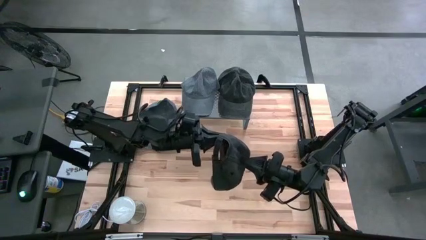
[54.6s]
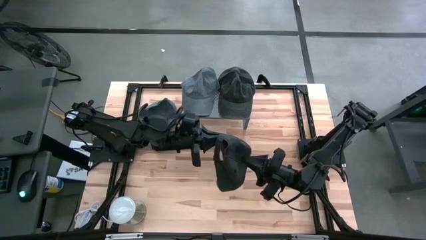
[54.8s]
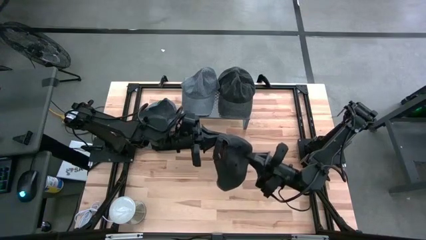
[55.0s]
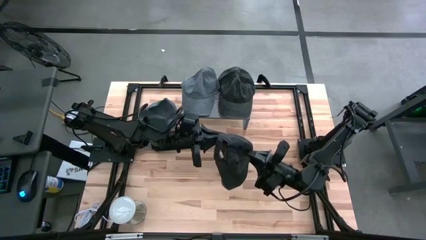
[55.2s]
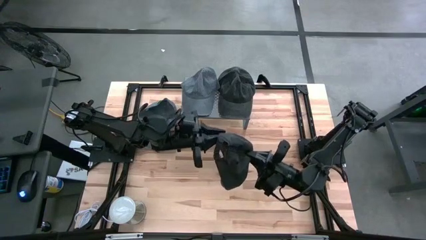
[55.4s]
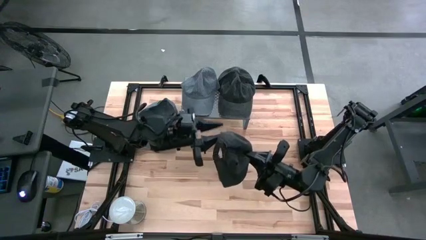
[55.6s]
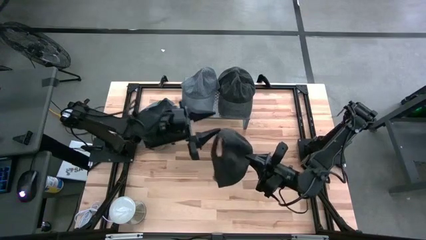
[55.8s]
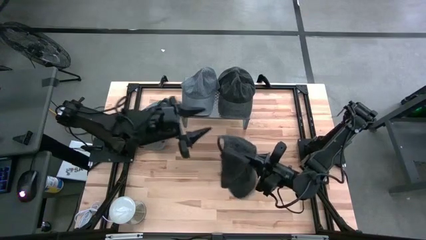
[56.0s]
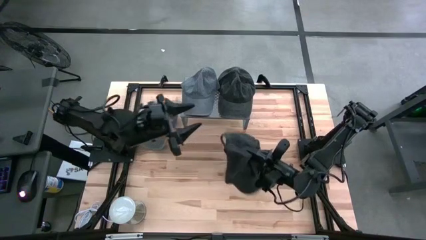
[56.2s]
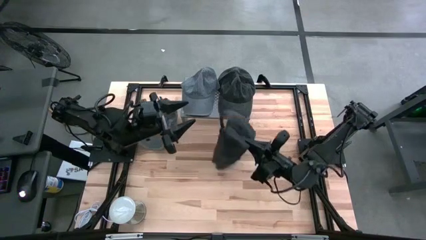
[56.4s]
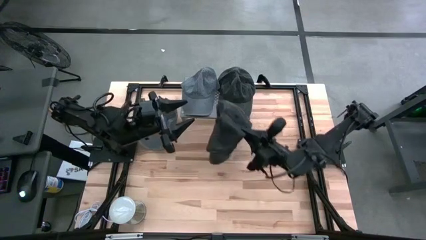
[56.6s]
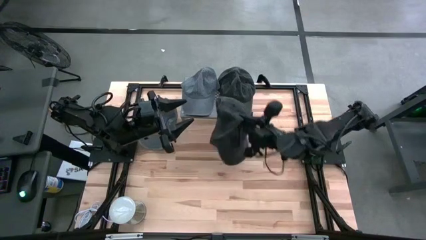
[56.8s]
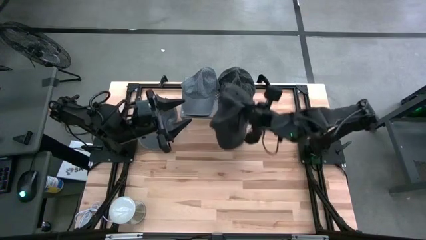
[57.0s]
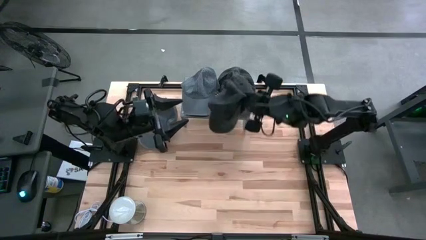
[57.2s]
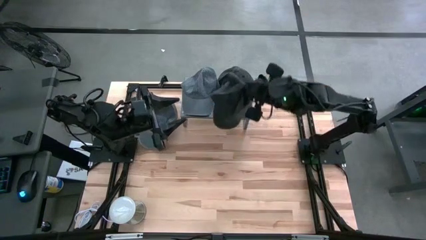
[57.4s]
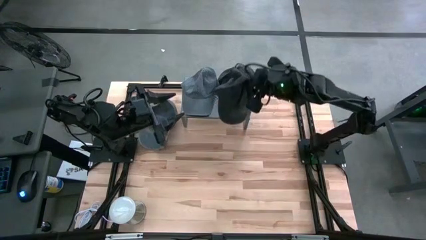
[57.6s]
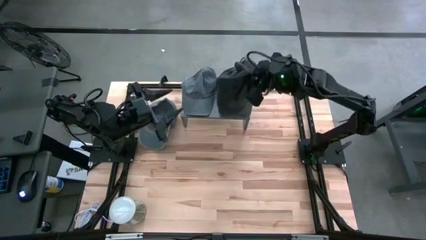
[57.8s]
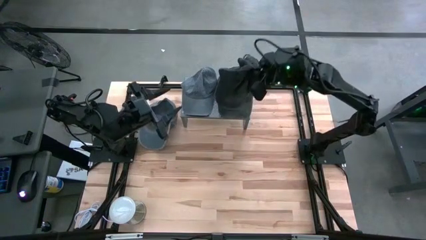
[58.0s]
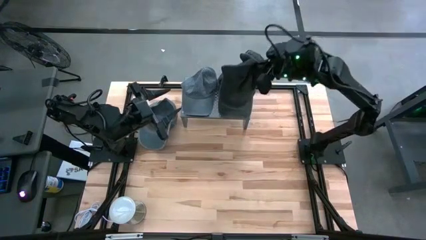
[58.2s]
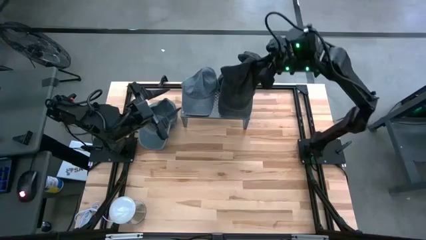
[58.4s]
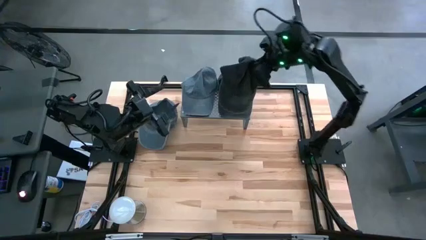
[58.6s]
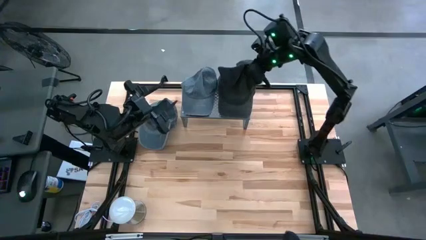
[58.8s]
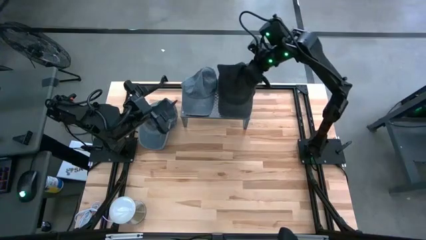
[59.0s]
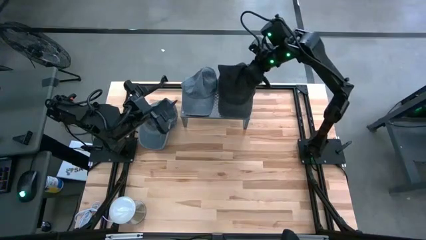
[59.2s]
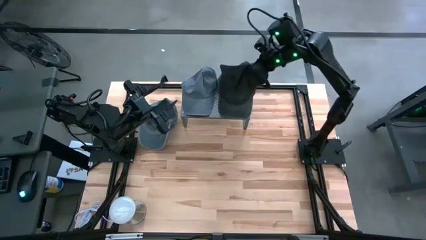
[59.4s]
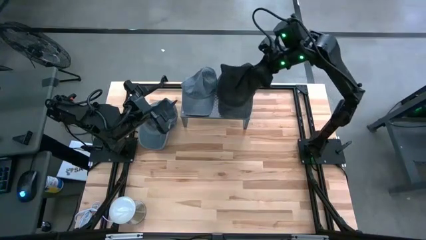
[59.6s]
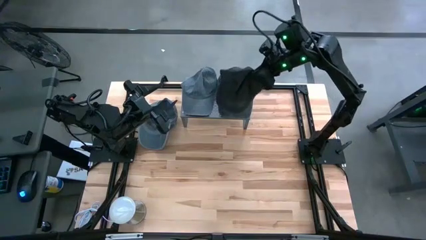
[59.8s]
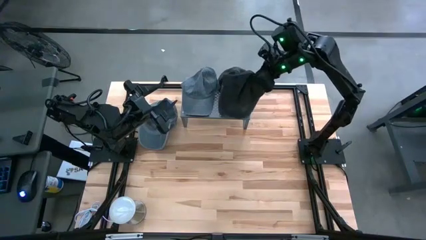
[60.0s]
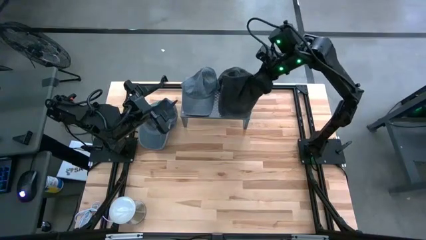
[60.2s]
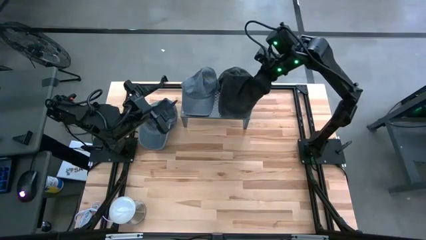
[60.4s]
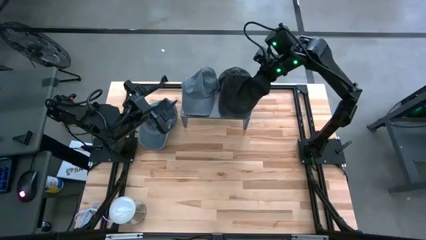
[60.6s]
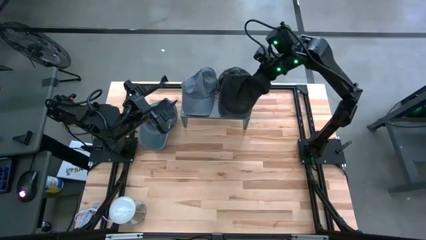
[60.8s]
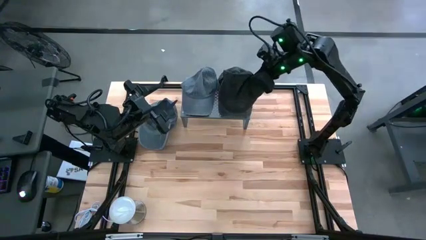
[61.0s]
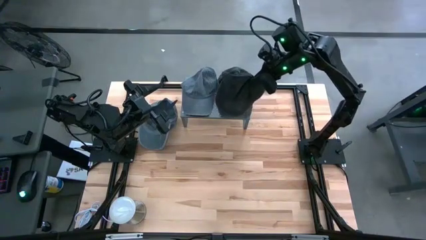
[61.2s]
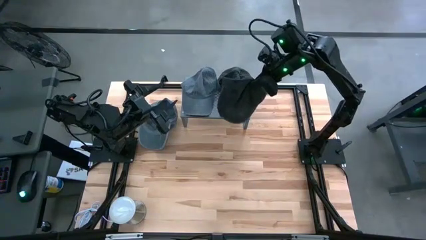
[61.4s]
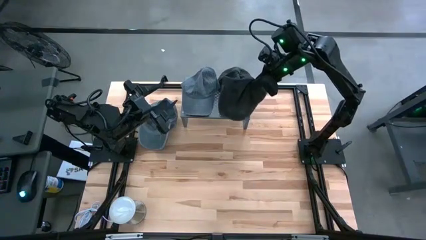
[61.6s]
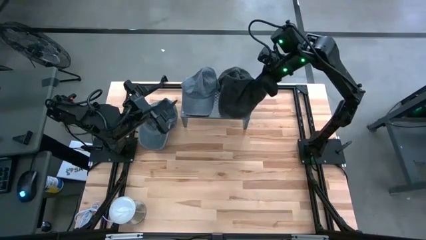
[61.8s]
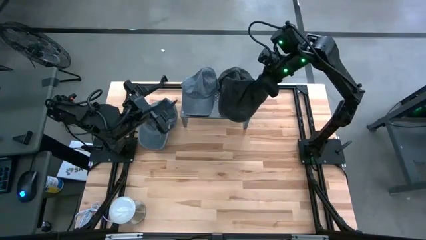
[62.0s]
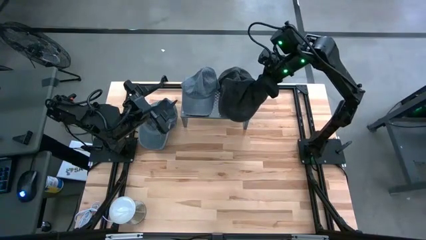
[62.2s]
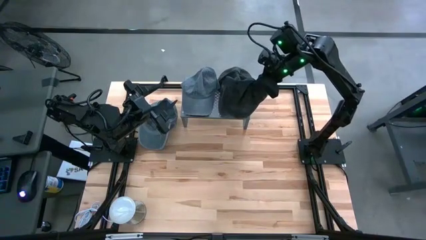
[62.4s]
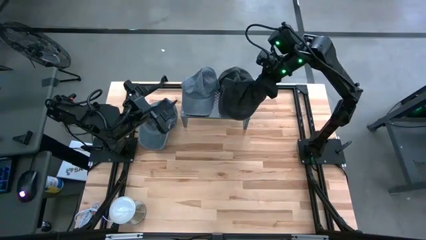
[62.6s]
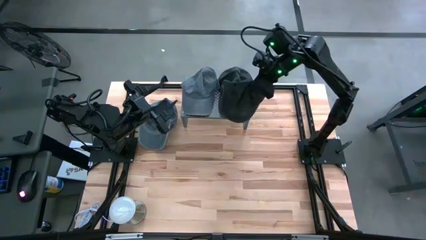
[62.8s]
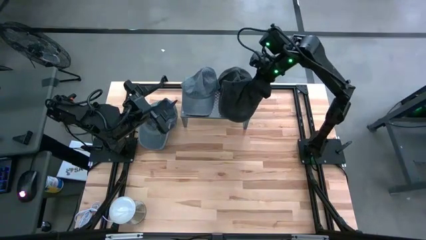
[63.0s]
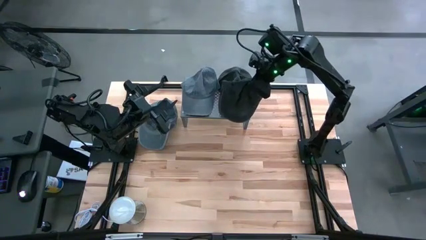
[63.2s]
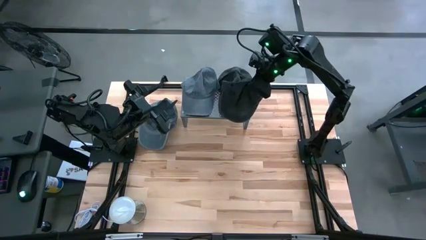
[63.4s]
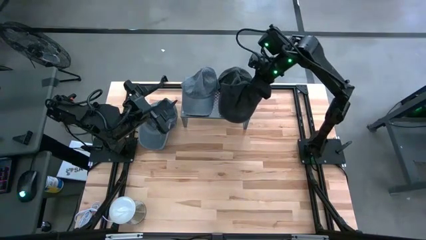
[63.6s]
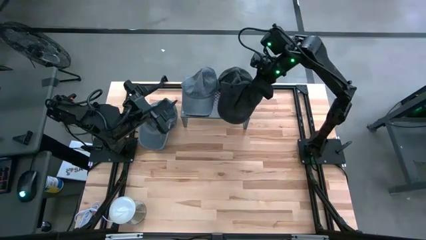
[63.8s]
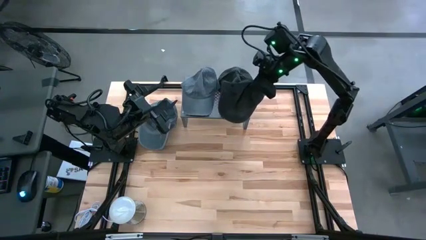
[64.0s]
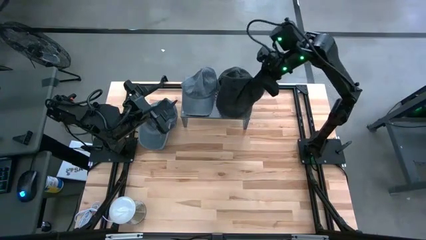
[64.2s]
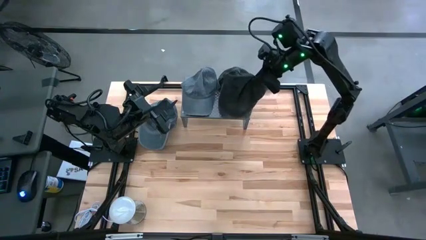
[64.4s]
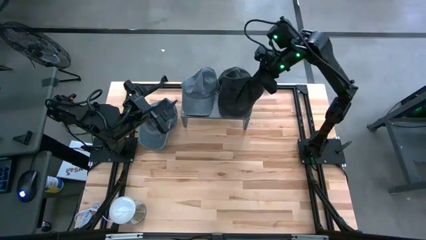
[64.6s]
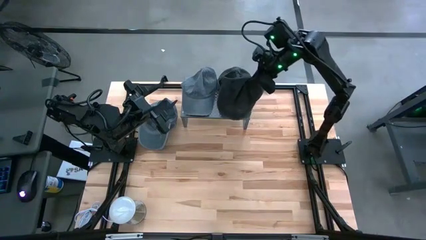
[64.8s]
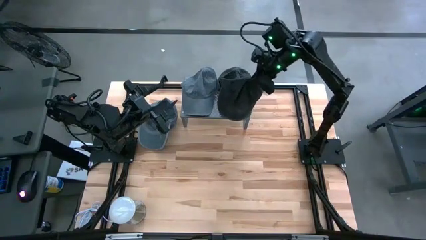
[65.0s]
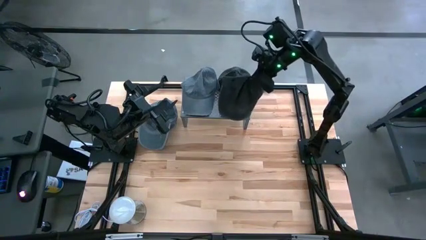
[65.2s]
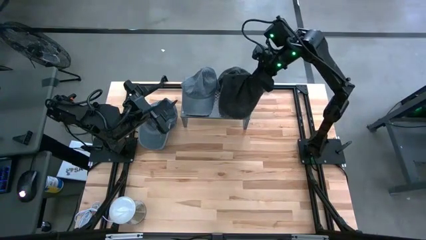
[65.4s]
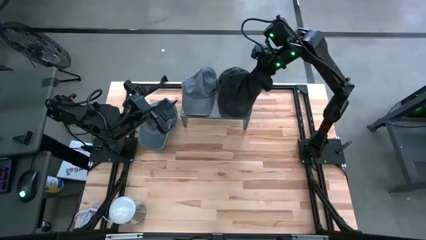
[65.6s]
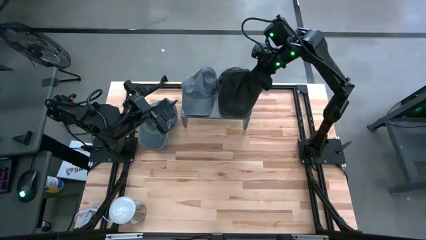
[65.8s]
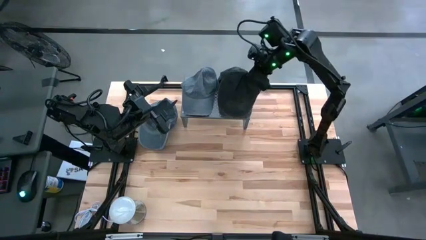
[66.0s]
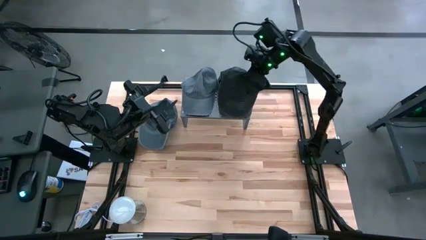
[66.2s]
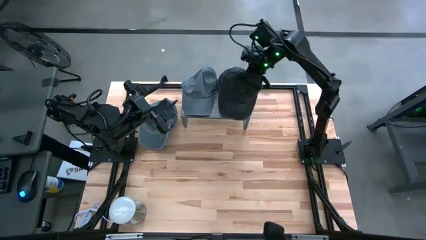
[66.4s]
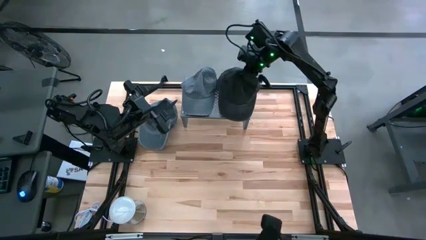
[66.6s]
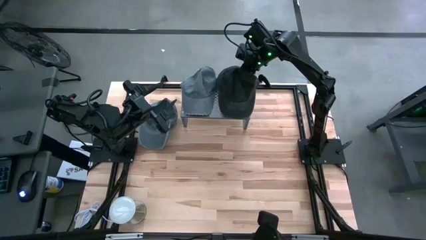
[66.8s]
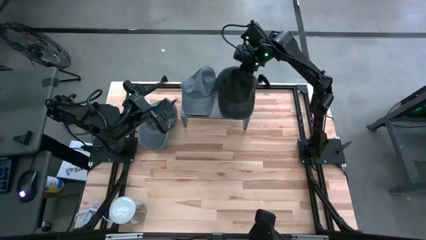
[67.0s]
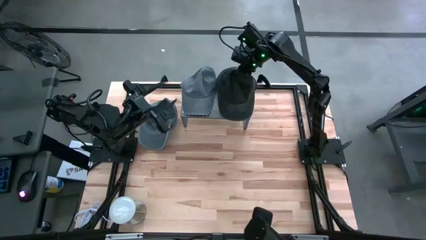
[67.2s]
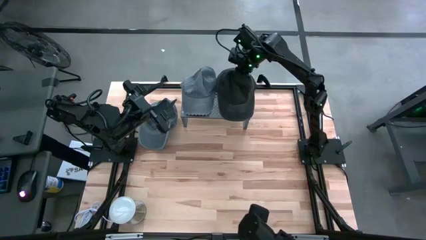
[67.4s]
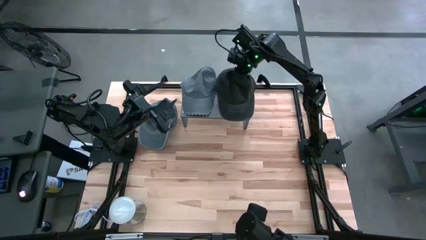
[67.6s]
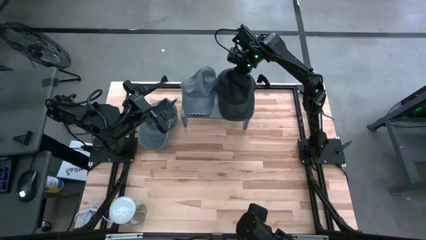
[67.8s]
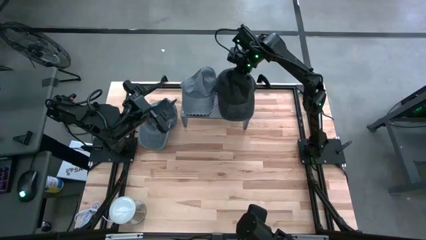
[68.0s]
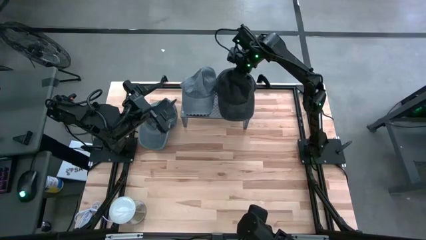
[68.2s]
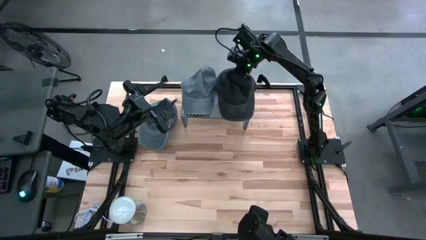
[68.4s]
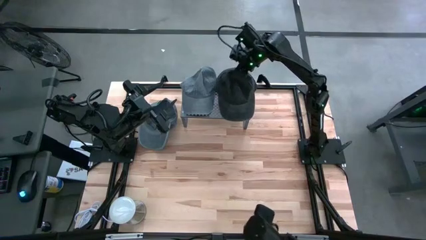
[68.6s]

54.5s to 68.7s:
Task: Pick & Place hat
Stack the black cap on top of the black cap on the shelf

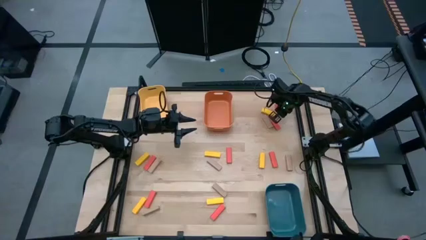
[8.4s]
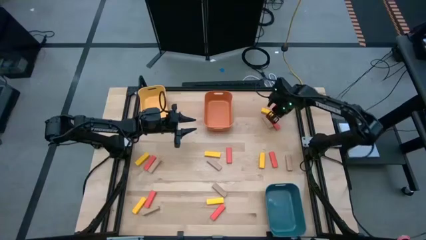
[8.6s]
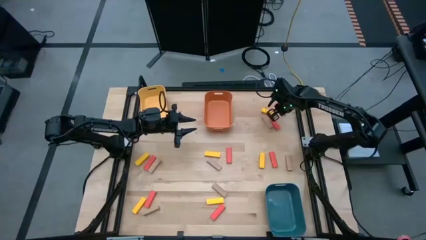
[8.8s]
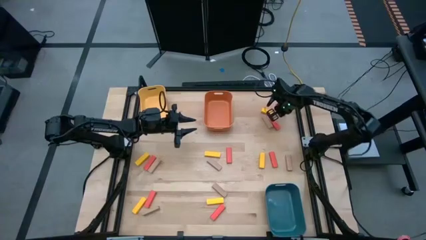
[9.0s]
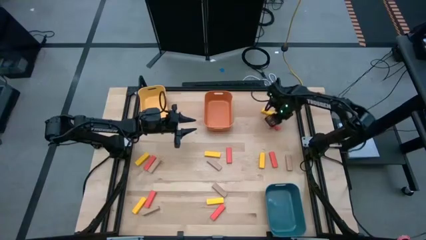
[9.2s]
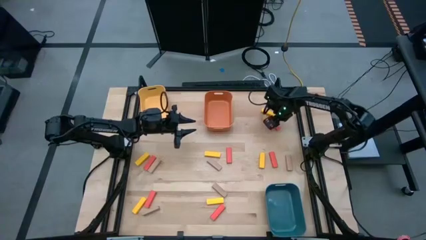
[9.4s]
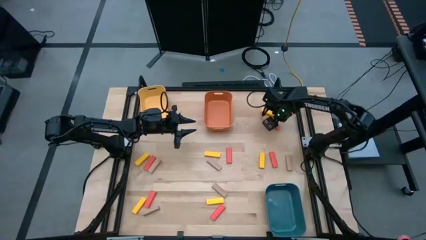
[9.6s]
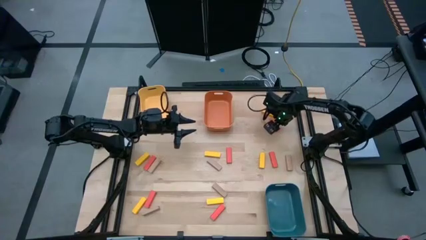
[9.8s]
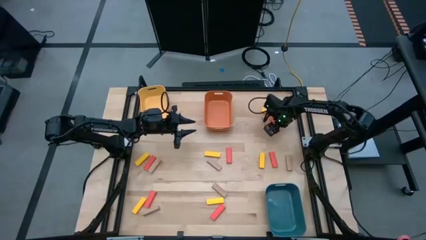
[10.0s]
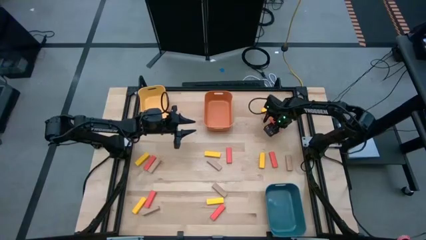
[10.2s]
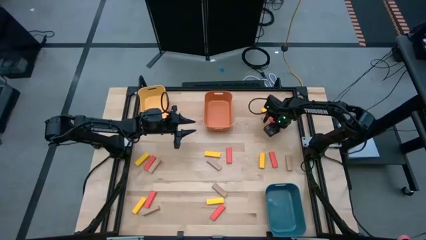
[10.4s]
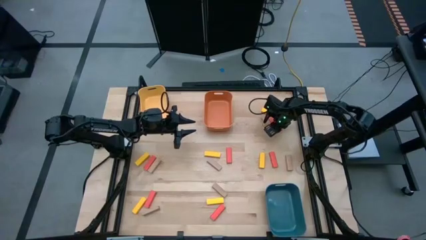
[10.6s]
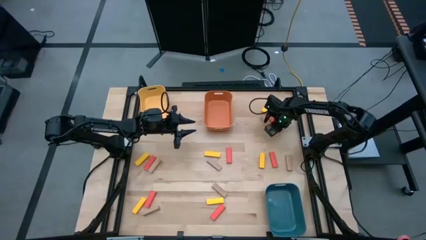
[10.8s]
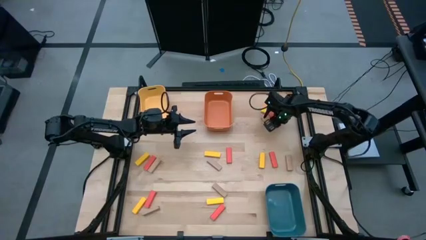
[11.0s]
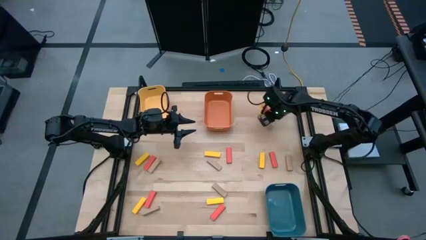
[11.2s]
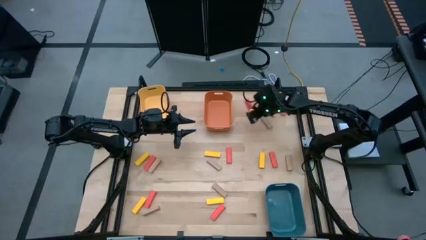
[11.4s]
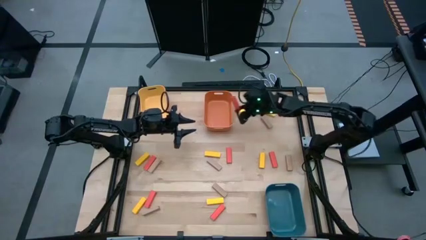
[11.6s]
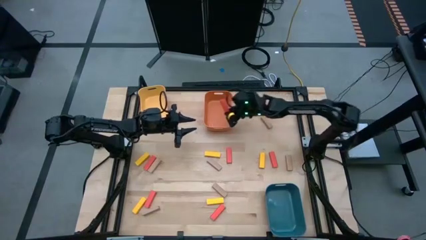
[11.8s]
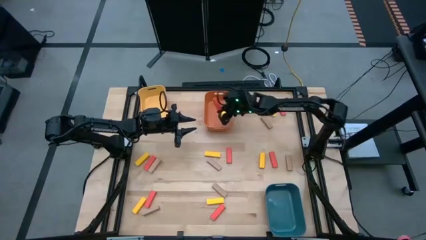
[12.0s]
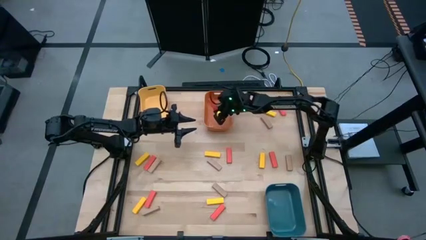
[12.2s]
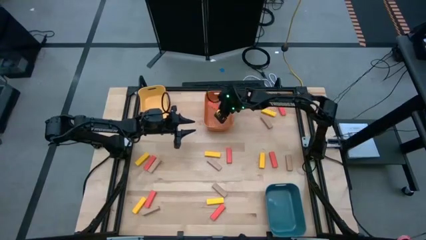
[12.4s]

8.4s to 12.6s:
Task: Sort blocks
Put the orange block into the orange bin
